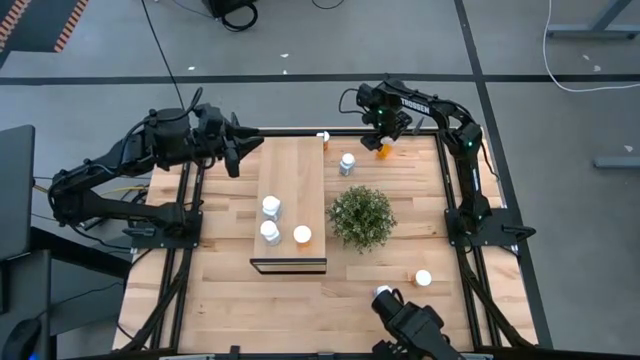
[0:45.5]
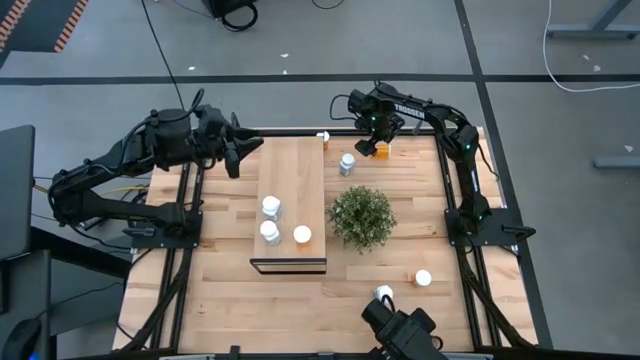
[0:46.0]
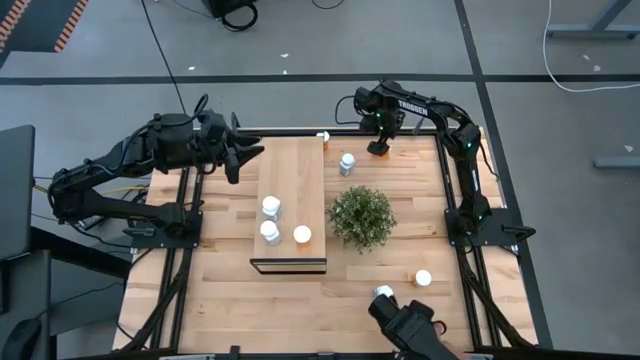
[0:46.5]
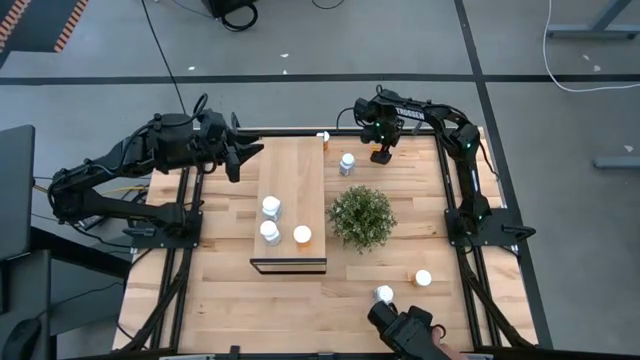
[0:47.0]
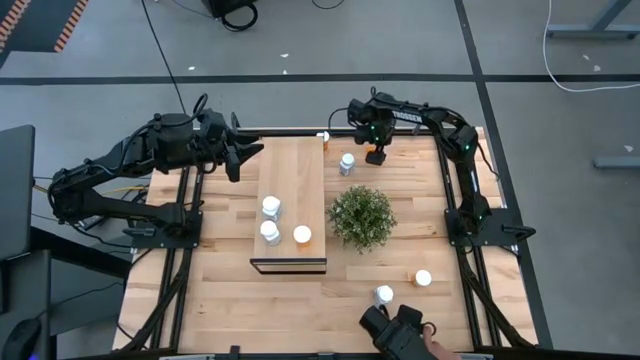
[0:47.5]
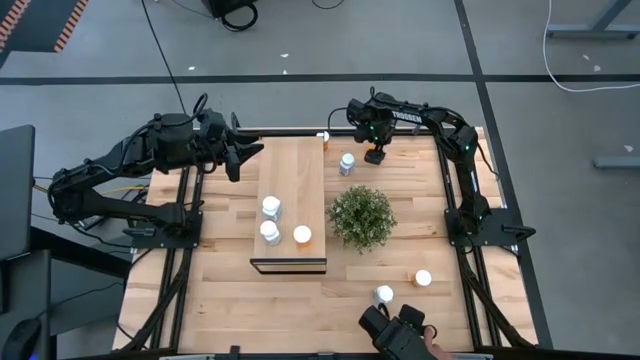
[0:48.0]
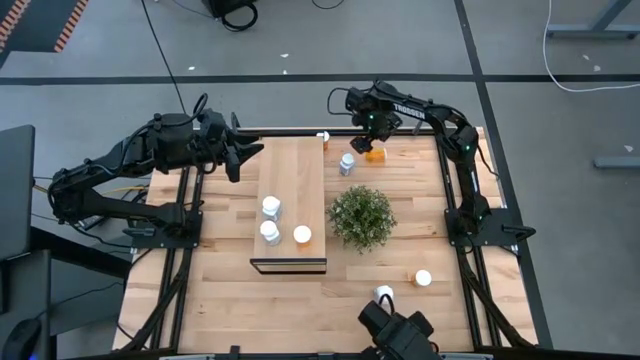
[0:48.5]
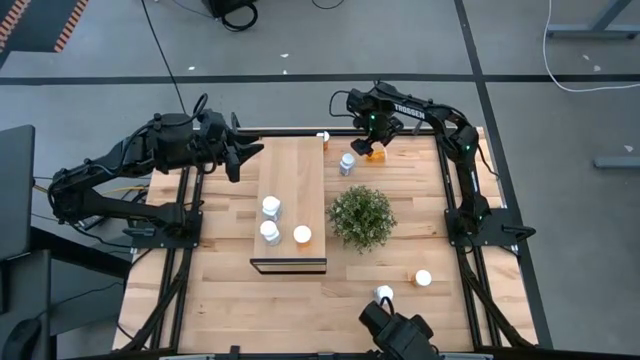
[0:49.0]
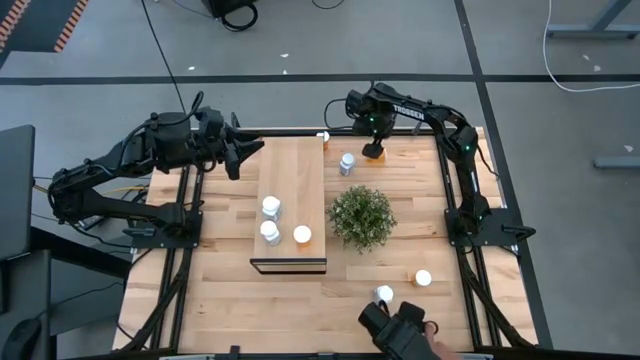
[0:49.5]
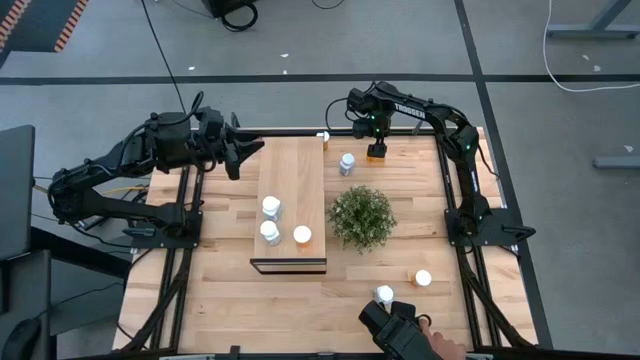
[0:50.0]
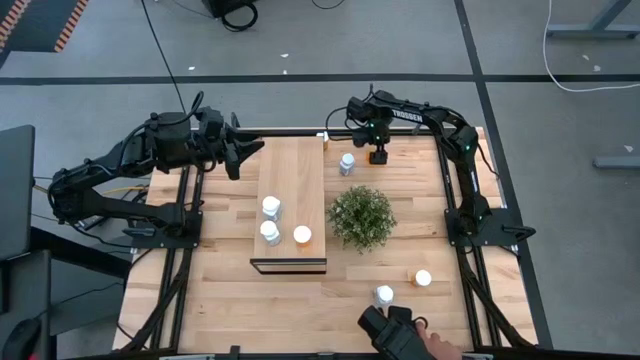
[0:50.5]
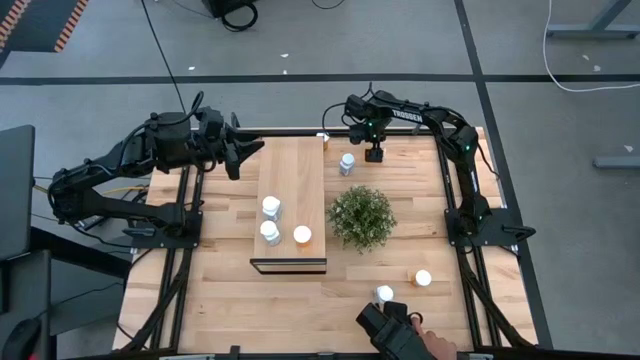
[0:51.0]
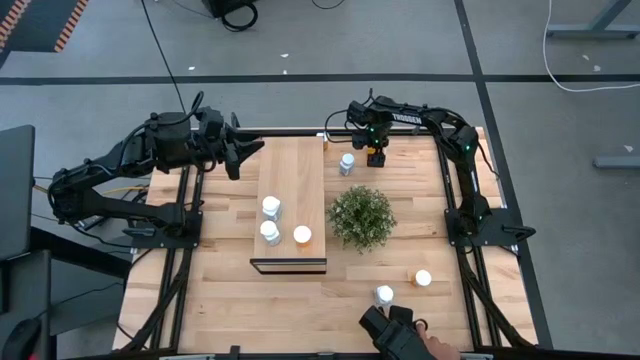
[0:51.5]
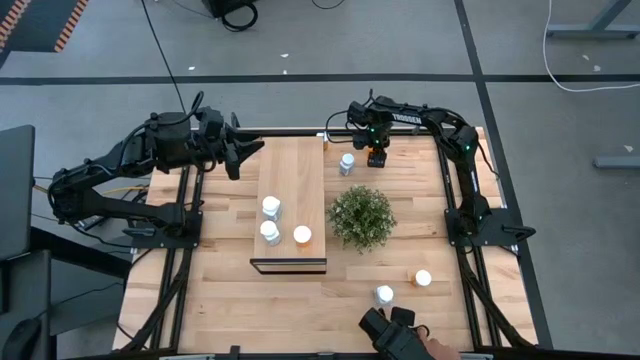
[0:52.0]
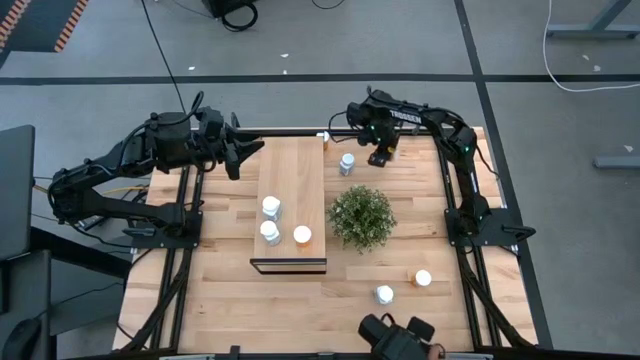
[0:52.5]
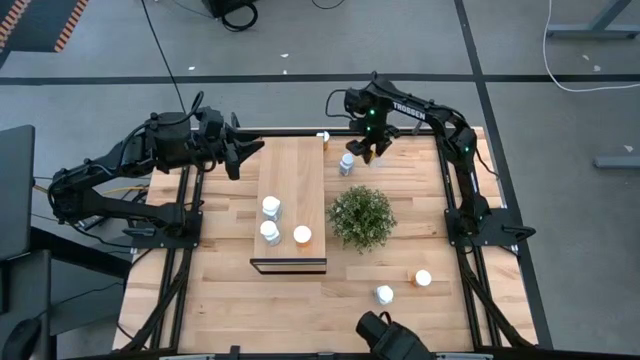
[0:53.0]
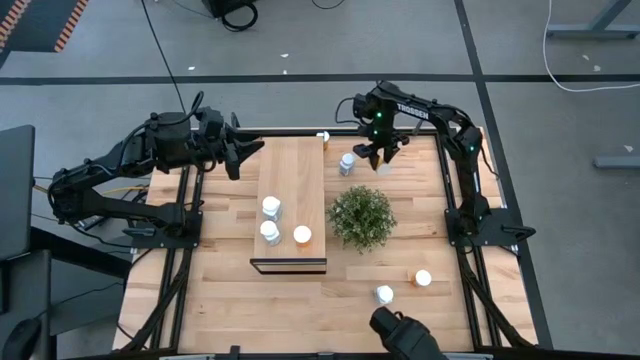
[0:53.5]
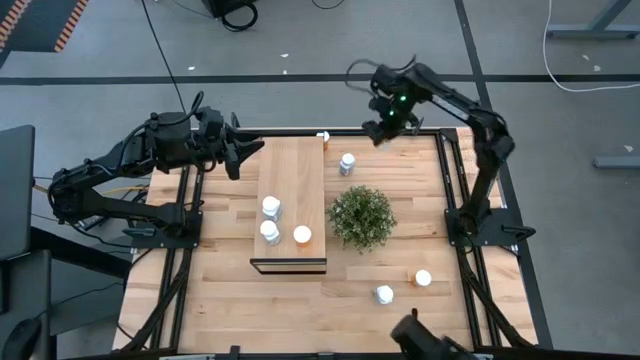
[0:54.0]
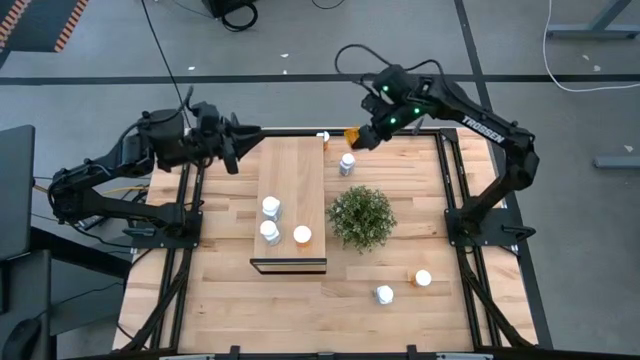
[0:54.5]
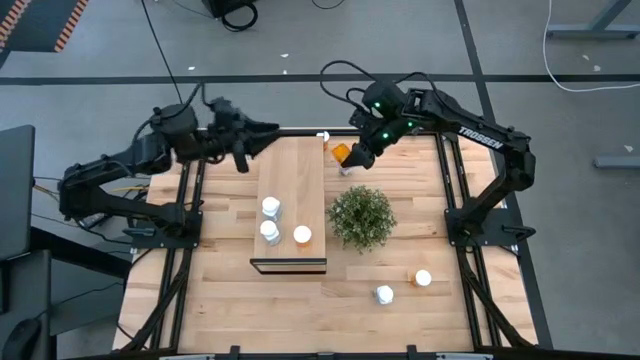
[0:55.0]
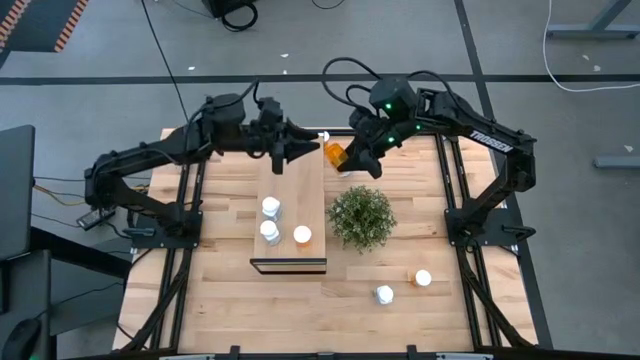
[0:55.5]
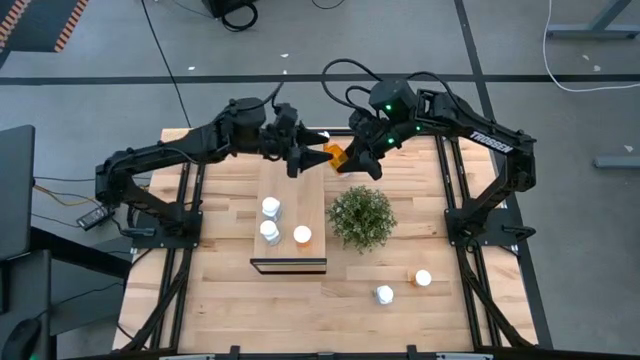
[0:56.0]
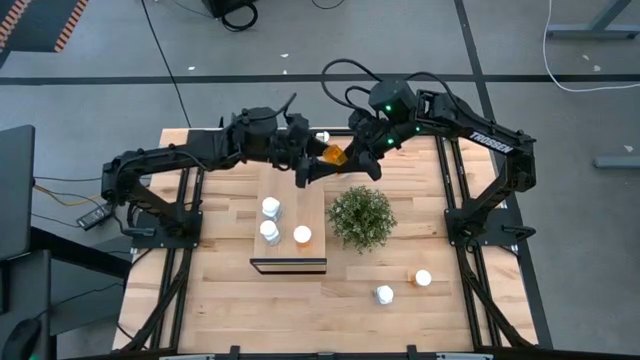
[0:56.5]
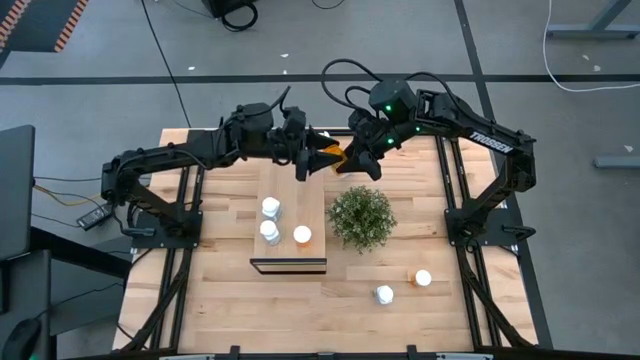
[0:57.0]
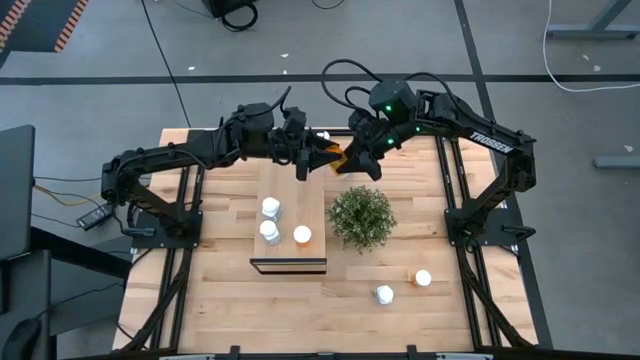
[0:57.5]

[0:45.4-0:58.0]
Task: Pick and place medicine bottles onto shelf by color
Put the top right orange pill bottle on the shelf aligned with the other orange pill bottle

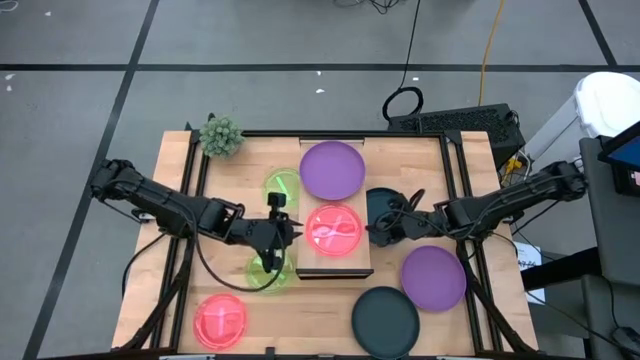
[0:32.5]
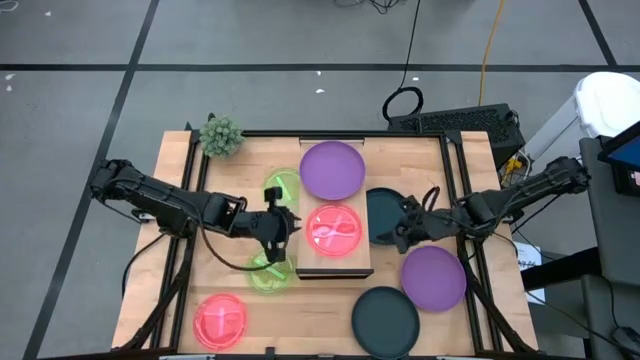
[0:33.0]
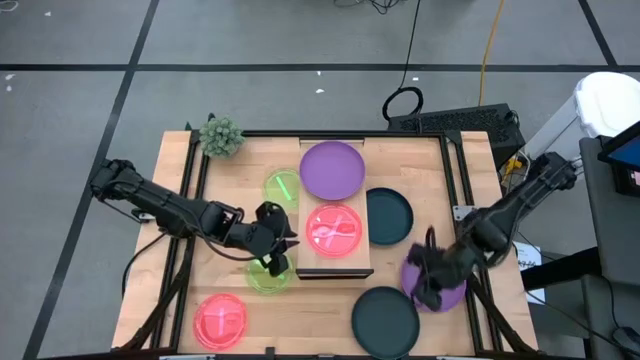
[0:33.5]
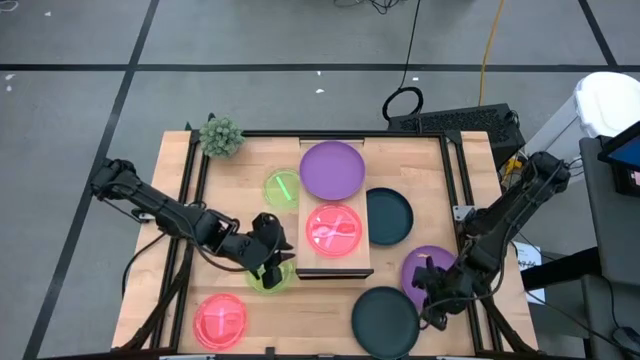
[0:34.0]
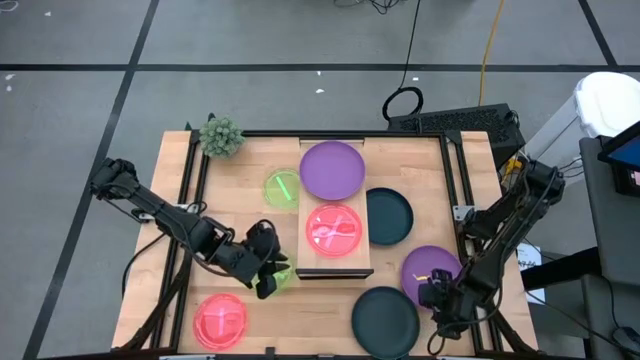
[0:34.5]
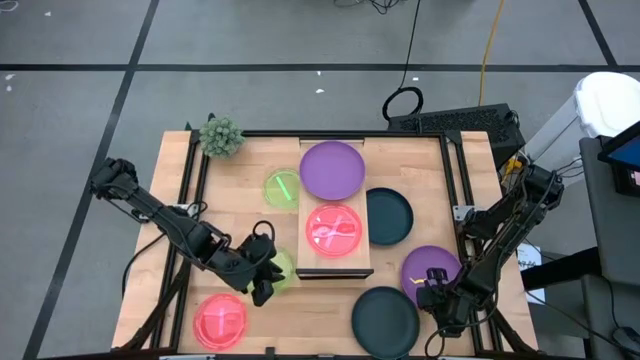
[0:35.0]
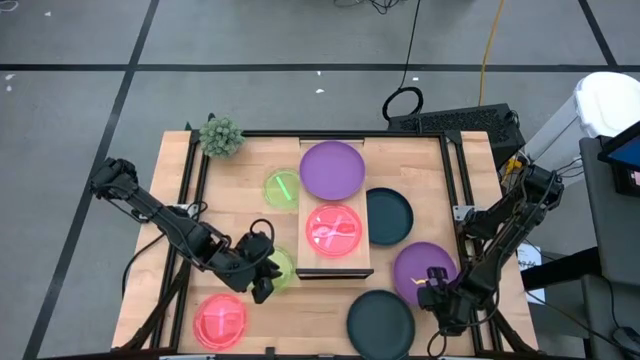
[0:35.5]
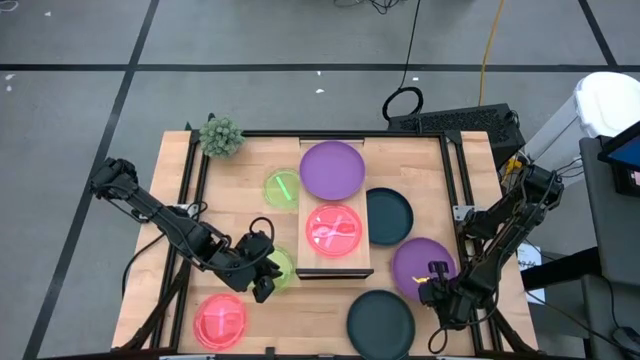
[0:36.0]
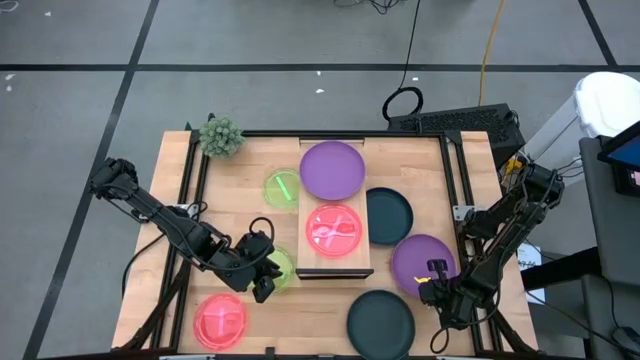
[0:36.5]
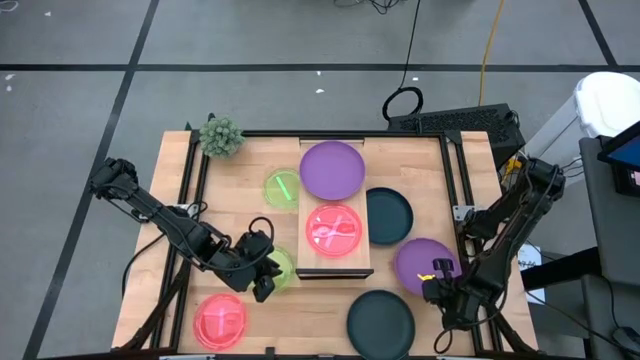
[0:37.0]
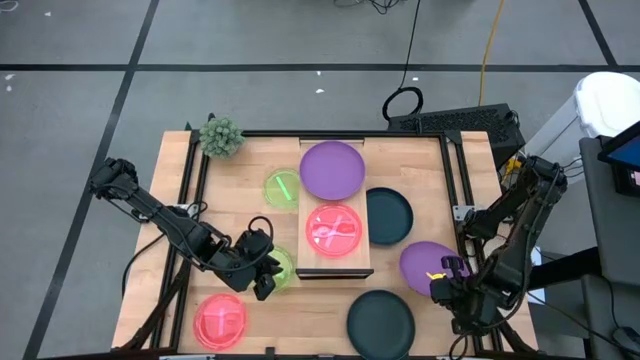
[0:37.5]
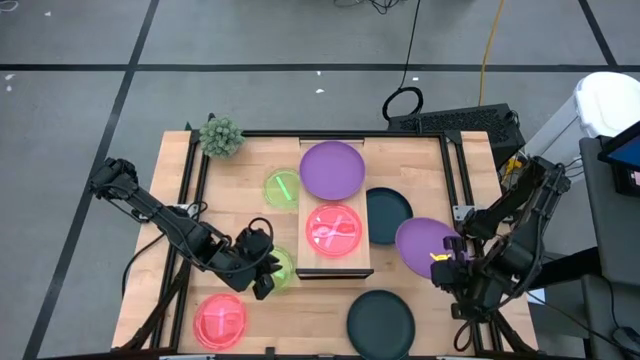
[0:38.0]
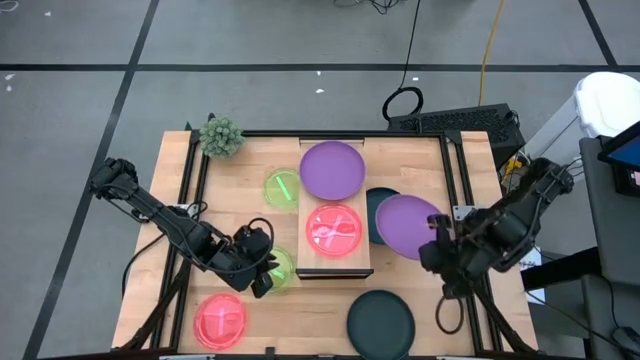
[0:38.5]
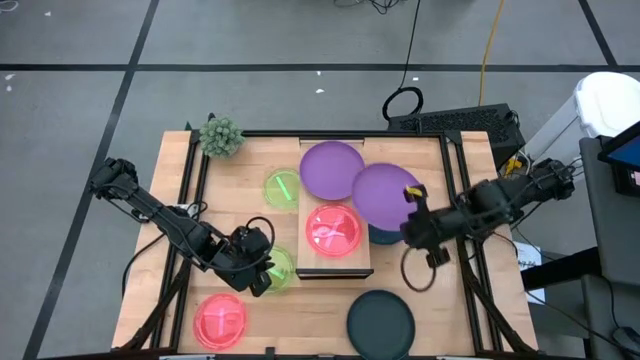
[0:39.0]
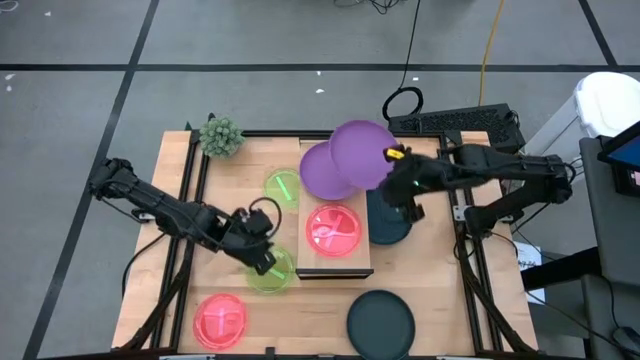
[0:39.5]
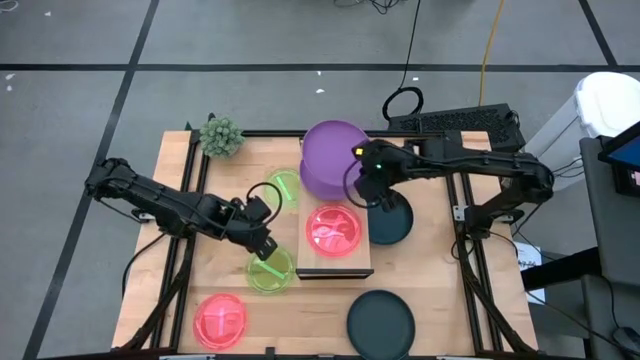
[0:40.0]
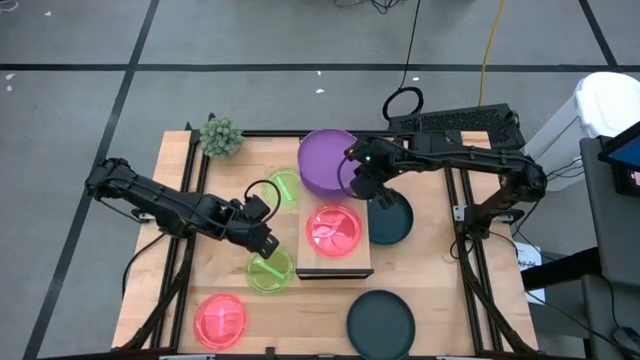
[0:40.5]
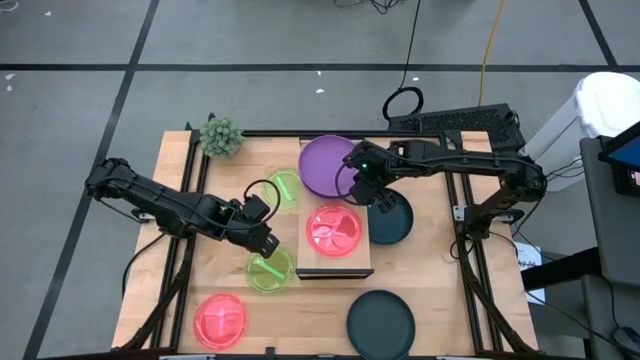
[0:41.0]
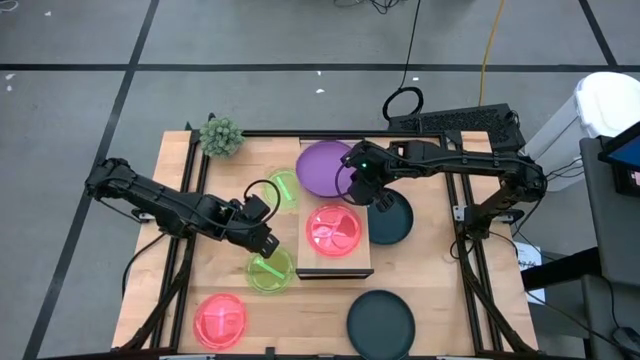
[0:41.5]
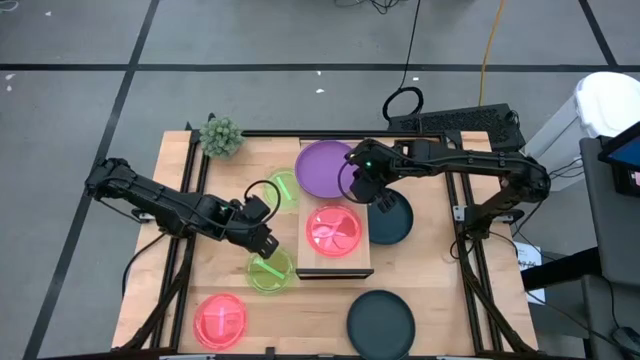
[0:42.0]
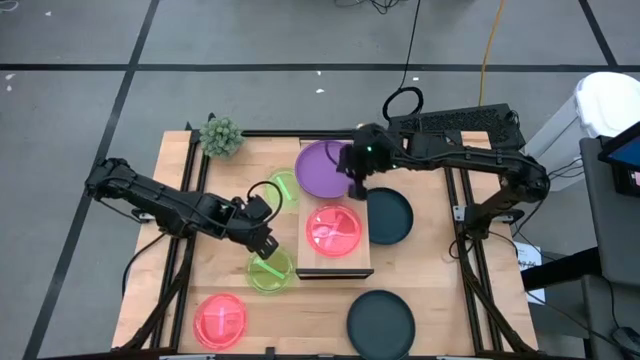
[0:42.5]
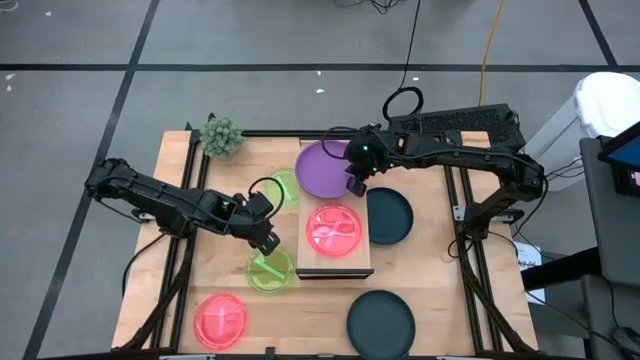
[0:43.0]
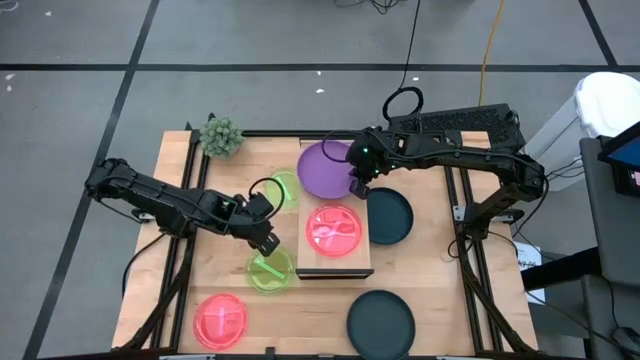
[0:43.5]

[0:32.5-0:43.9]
Task: Place and stack plates onto a shelf
Stack the purple plate on top of the other purple plate on the shelf
